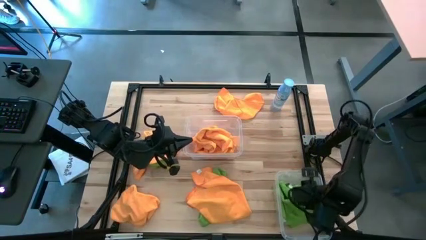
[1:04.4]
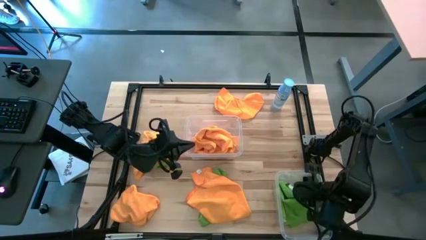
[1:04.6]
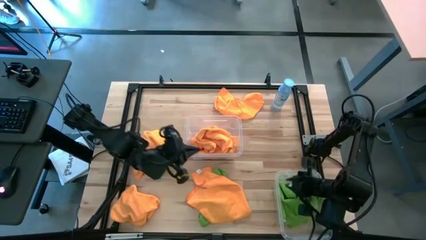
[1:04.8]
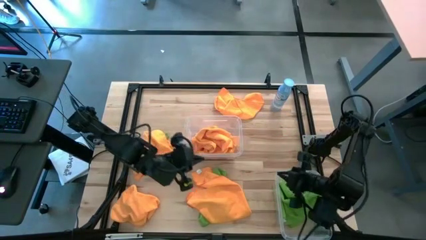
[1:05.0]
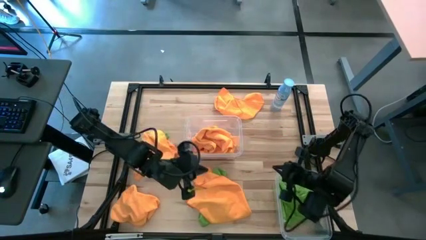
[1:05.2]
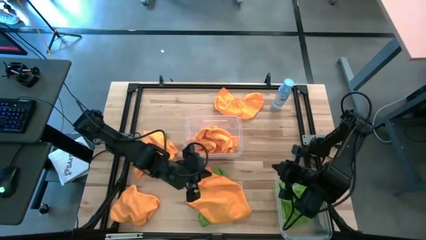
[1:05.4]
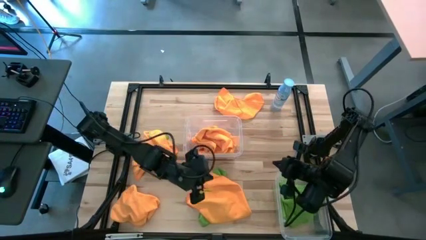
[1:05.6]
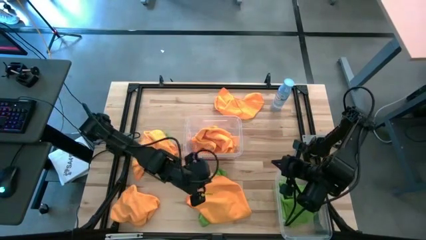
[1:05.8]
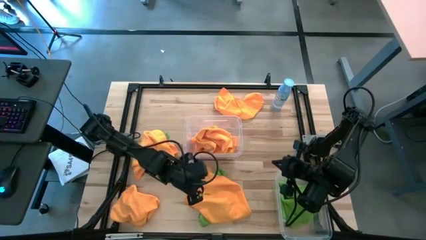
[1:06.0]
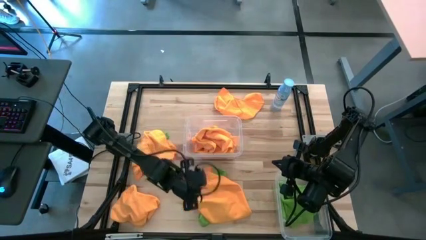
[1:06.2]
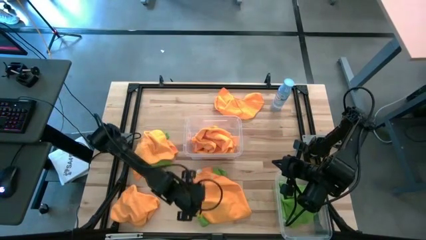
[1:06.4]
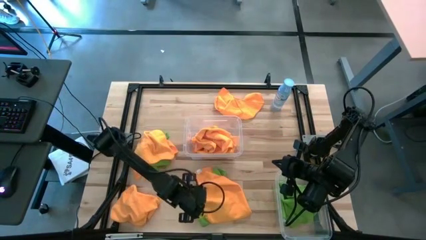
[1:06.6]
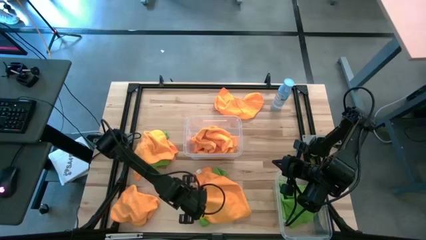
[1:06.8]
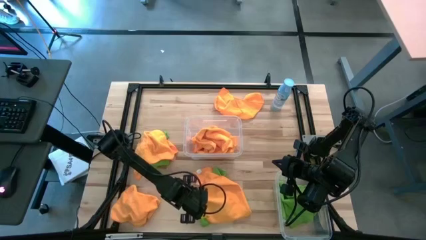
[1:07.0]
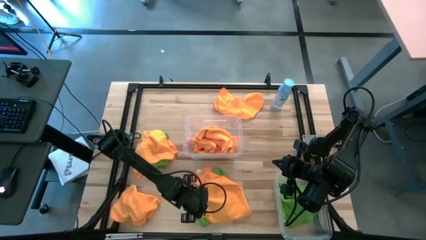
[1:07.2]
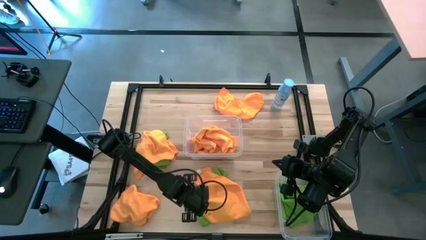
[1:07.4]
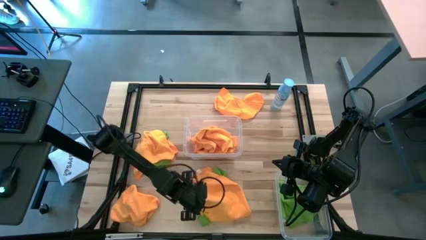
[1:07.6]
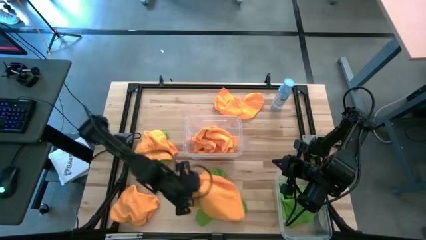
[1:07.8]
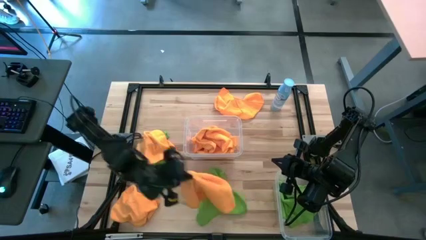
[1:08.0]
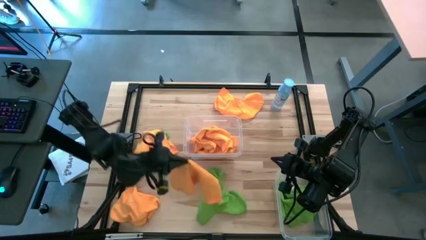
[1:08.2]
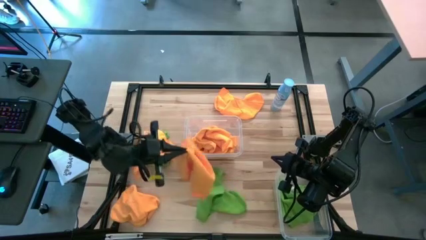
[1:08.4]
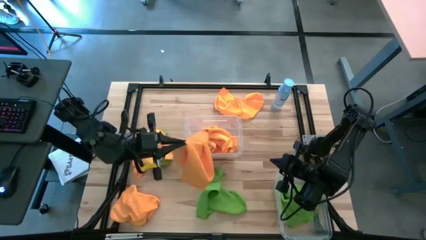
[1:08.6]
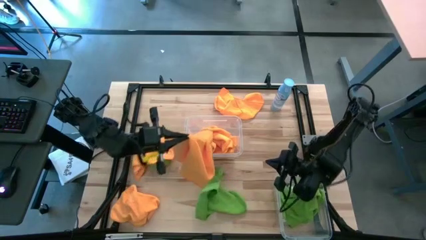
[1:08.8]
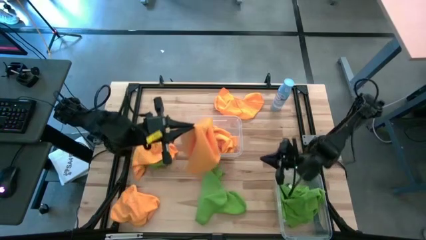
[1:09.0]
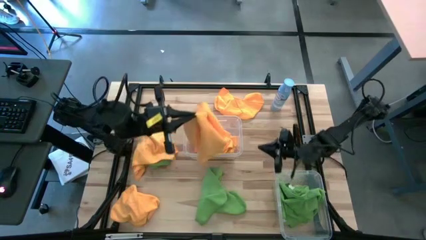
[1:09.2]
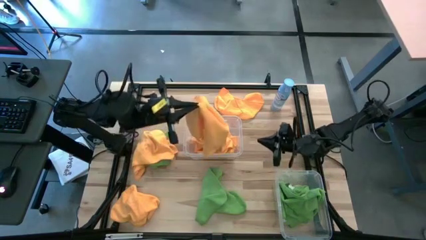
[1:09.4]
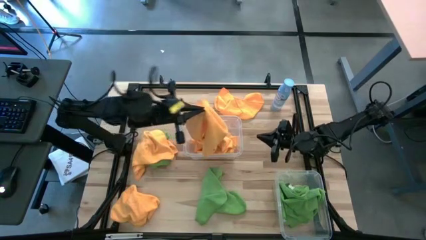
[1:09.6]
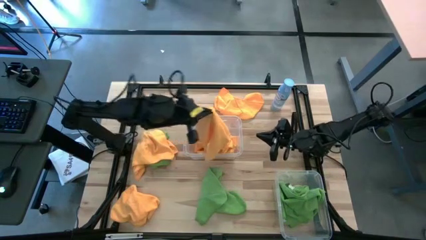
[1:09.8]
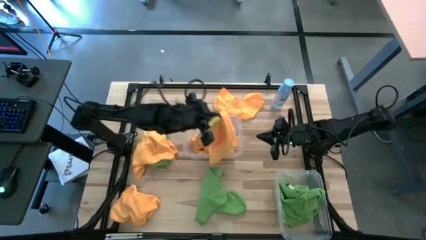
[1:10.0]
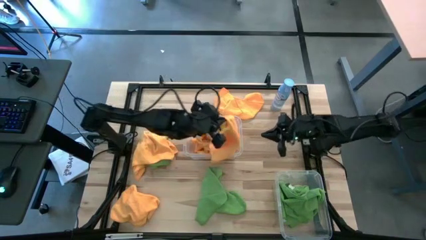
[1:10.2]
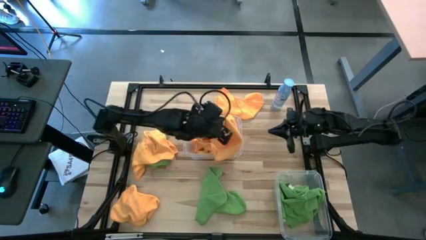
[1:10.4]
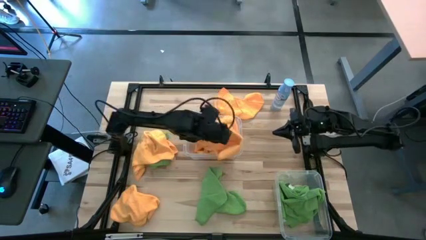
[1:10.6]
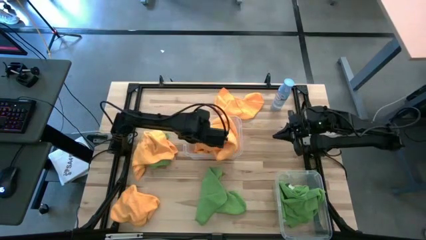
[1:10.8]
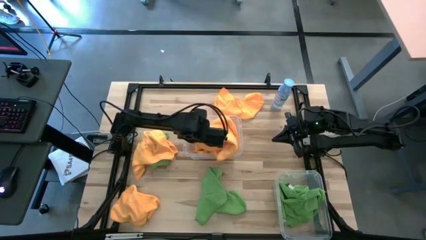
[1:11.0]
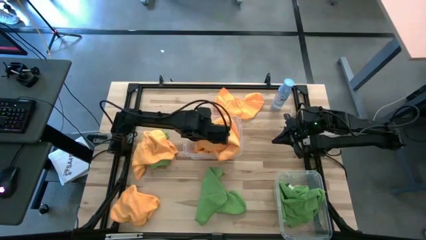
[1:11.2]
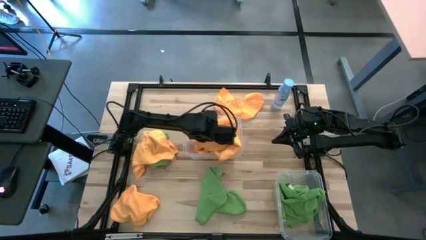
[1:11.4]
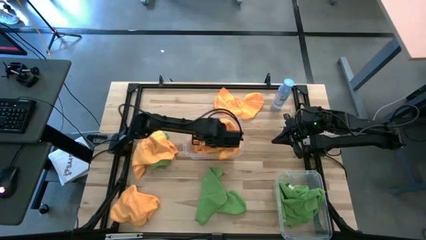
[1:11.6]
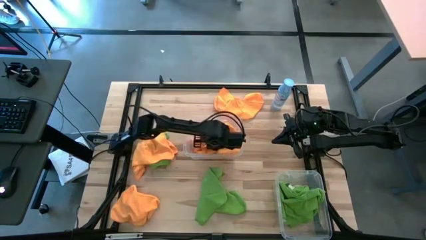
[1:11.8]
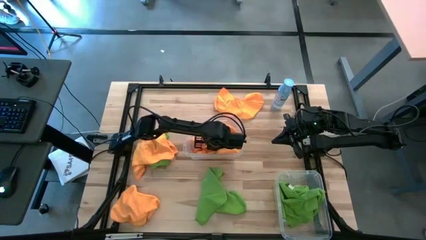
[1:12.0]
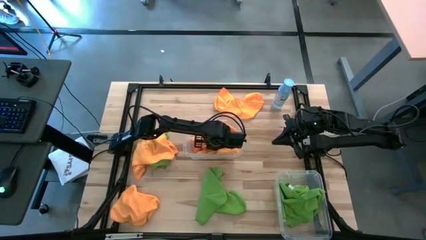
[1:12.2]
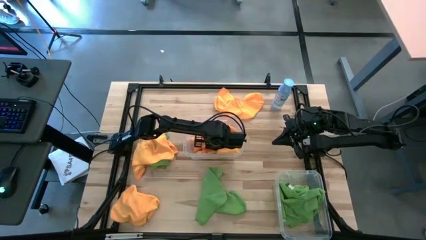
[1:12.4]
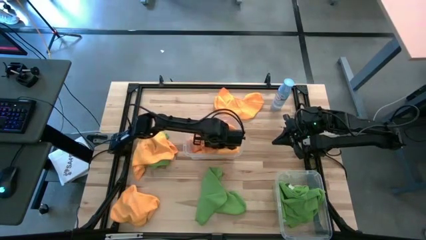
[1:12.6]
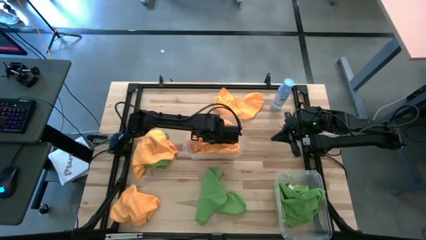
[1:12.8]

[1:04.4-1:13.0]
Task: Sort microfiber towel by color & place in baskets
Put the yellow microfiber cloth into the top transparent bin

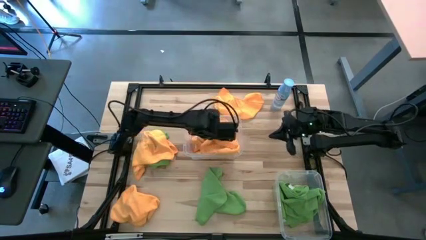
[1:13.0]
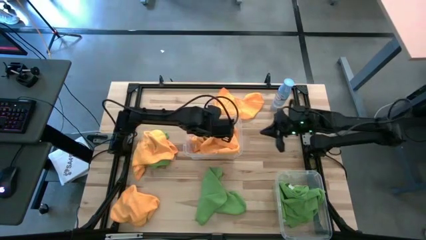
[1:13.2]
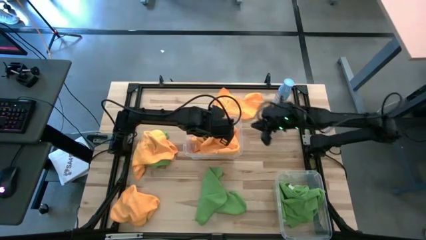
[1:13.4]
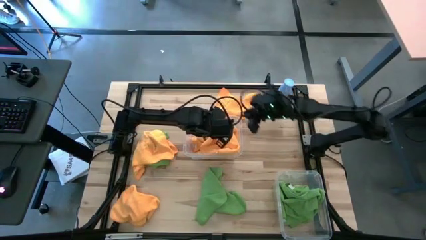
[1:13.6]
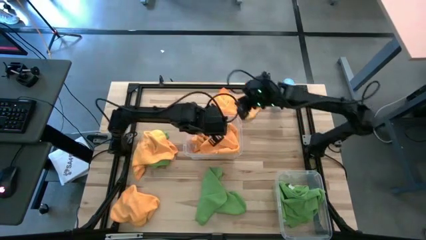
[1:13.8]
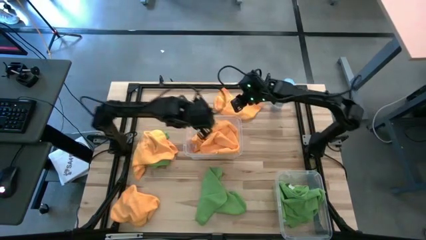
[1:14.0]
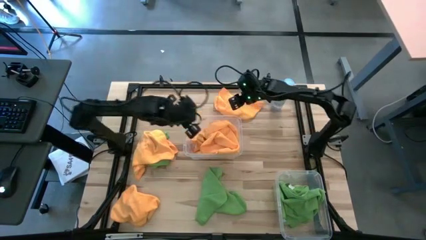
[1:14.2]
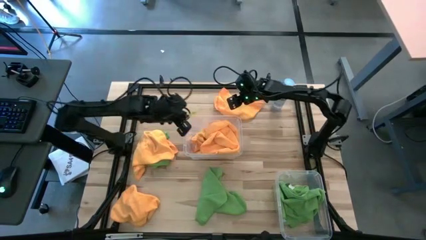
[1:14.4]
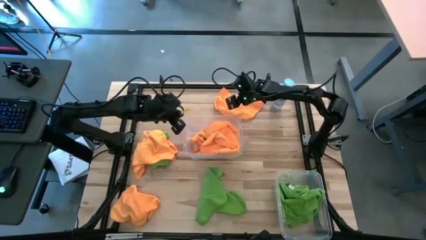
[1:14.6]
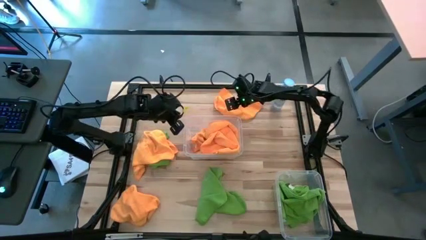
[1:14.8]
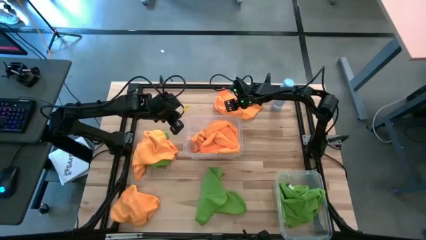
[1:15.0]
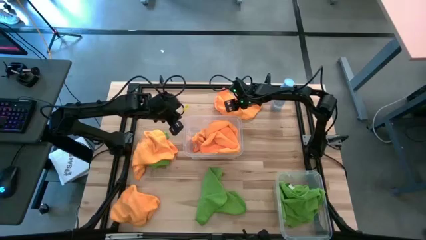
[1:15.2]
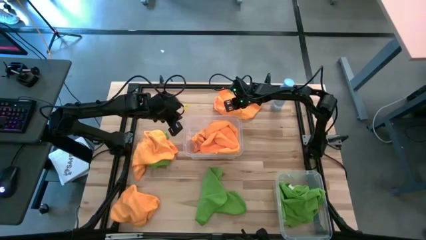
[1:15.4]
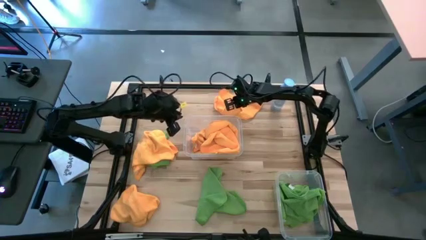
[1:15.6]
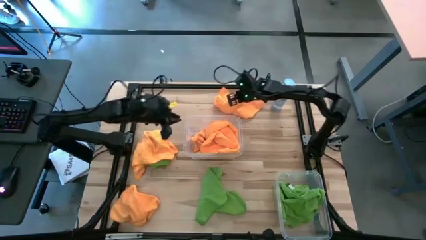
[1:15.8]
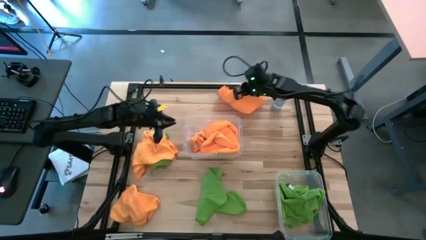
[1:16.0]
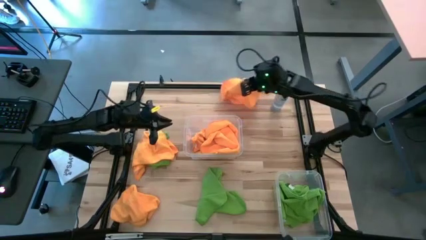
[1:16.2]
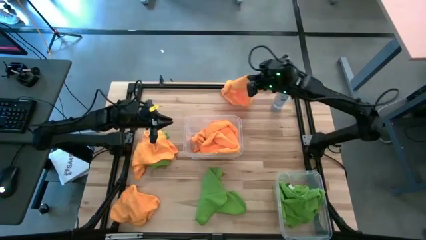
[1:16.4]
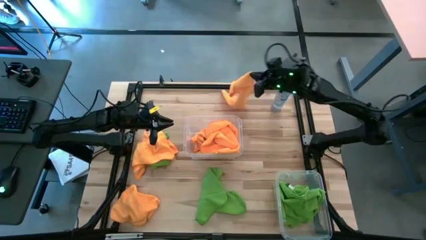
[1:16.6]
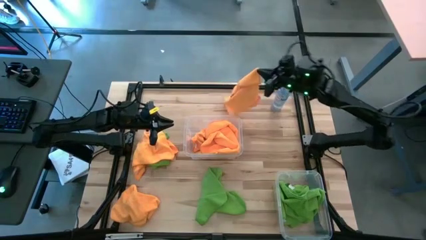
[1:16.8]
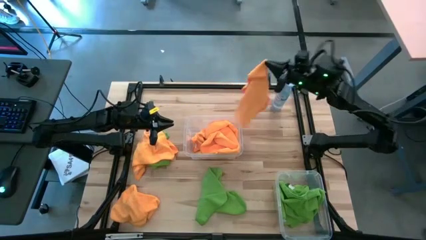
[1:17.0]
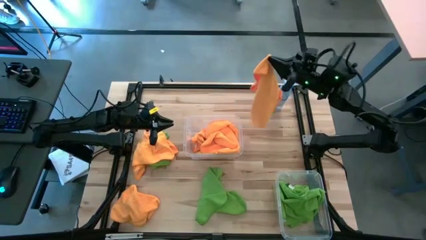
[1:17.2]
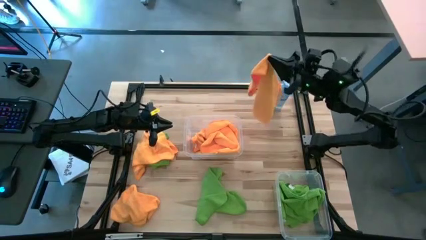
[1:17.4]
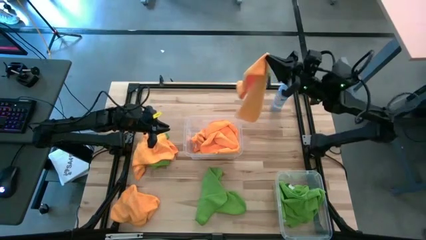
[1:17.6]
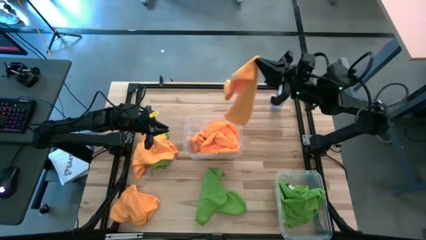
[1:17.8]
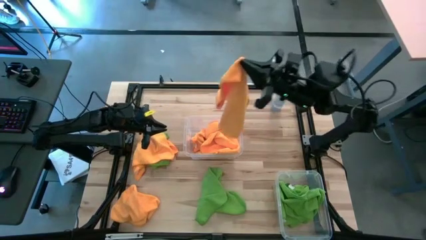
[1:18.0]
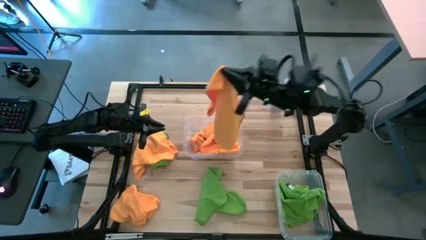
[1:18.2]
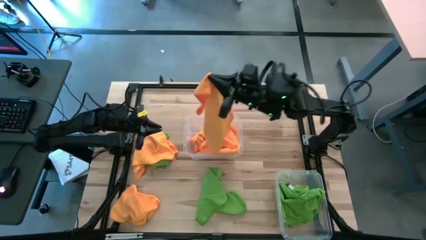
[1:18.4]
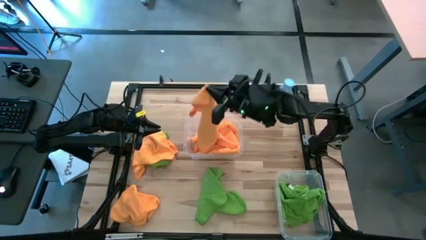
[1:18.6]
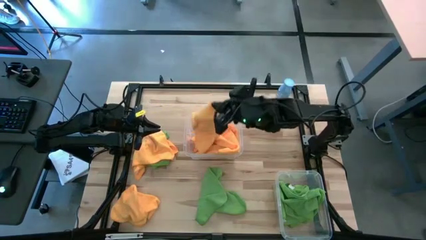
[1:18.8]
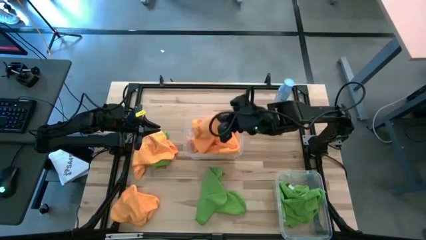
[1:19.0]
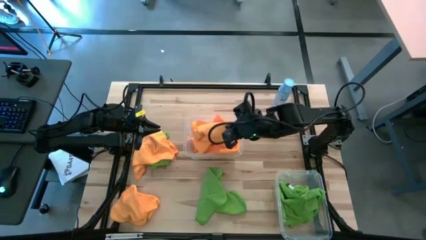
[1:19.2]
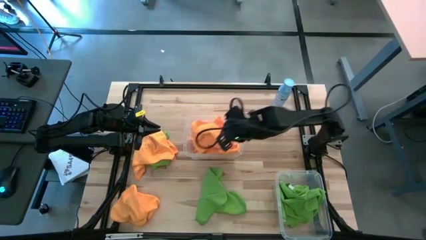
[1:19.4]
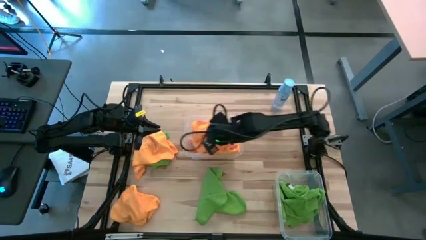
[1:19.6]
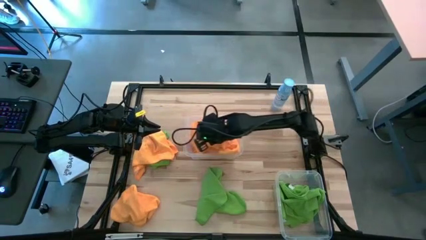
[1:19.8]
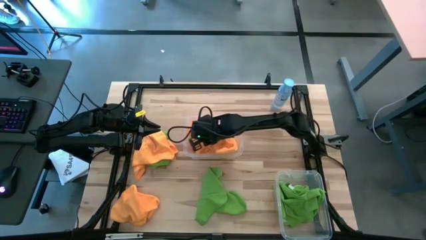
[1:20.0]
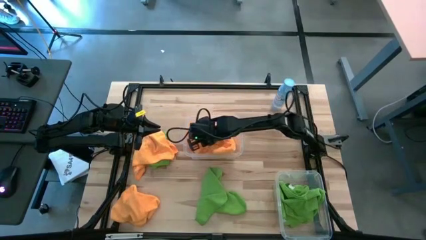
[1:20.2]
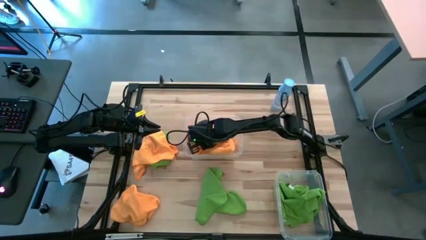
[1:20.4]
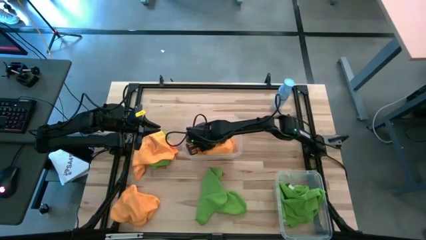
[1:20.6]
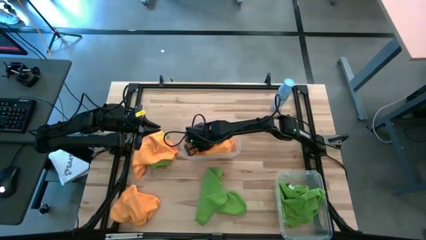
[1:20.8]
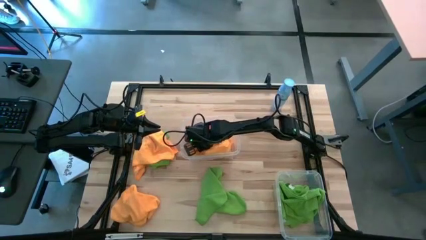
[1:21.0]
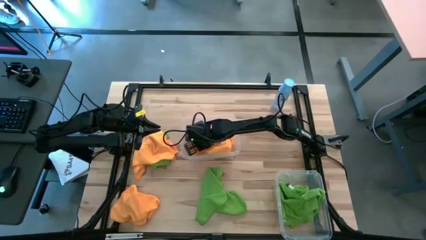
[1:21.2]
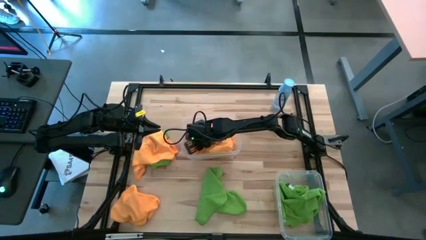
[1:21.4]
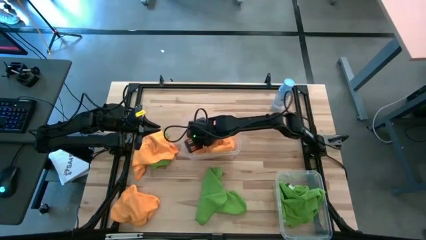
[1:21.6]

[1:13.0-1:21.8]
Put the yellow microfiber cloth into the top transparent bin
